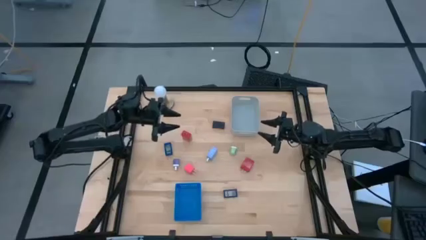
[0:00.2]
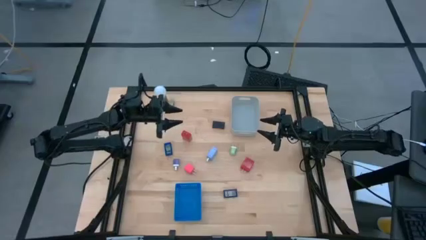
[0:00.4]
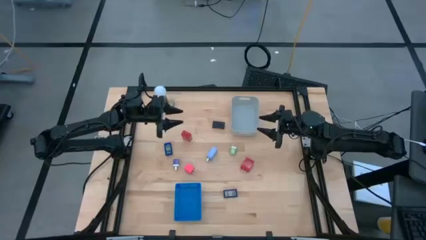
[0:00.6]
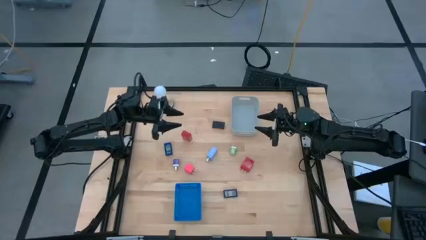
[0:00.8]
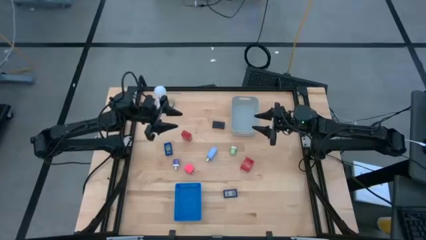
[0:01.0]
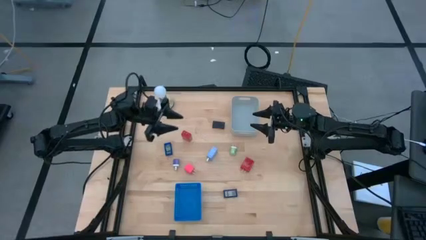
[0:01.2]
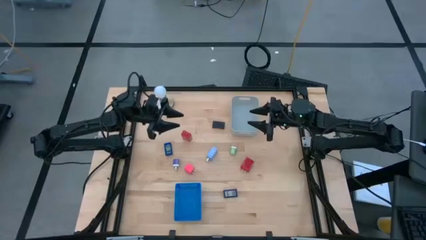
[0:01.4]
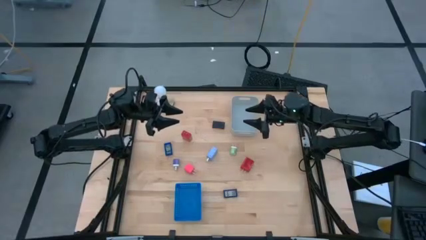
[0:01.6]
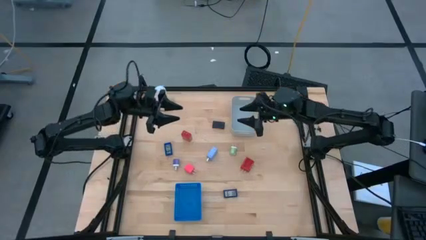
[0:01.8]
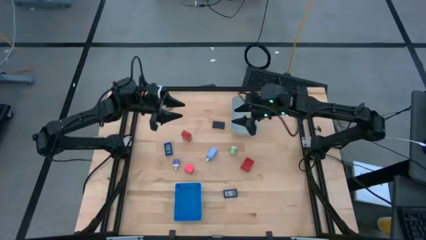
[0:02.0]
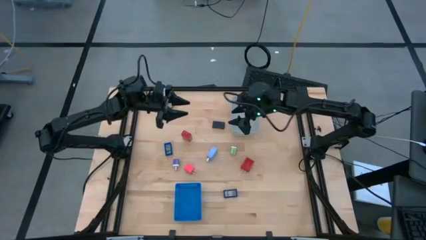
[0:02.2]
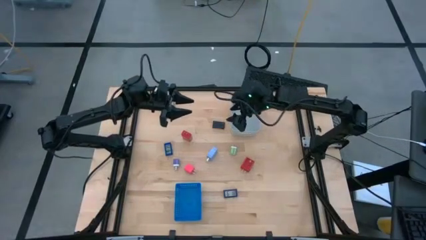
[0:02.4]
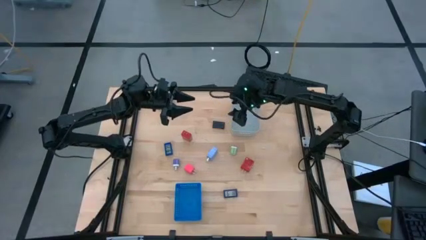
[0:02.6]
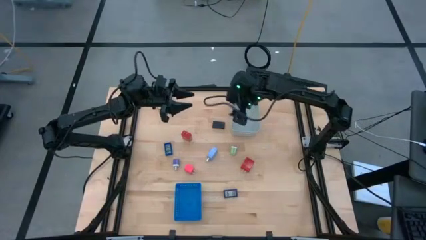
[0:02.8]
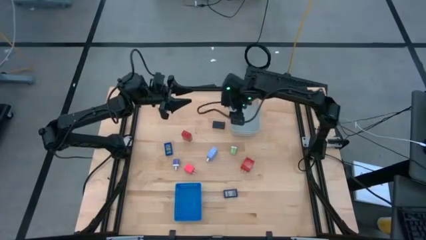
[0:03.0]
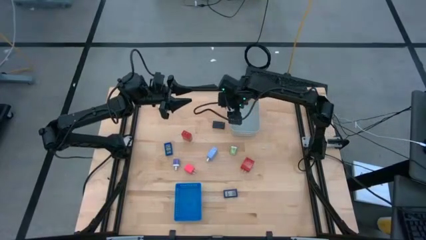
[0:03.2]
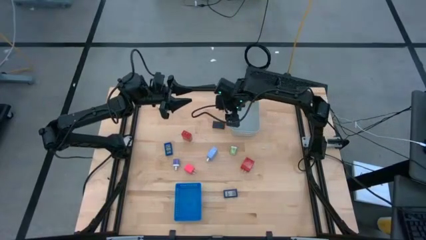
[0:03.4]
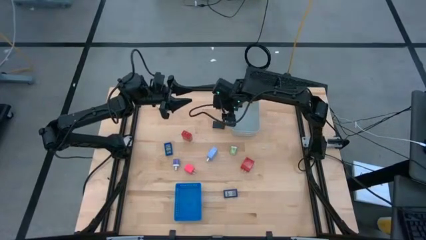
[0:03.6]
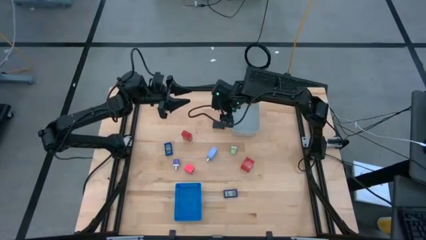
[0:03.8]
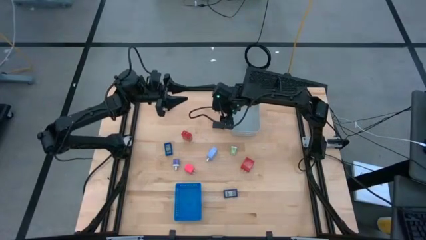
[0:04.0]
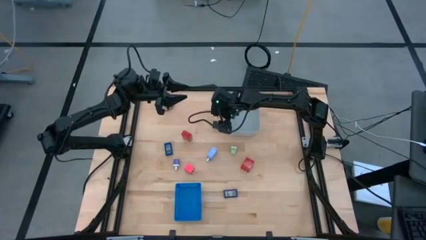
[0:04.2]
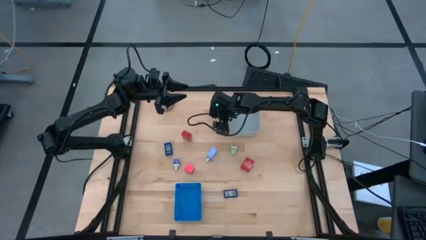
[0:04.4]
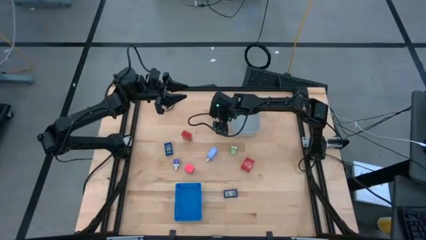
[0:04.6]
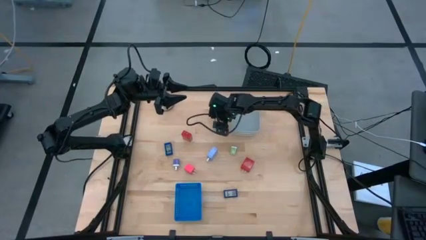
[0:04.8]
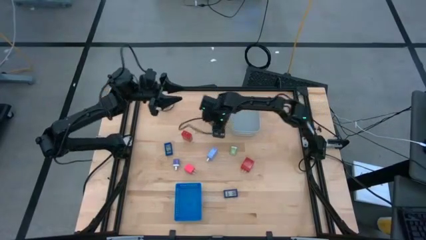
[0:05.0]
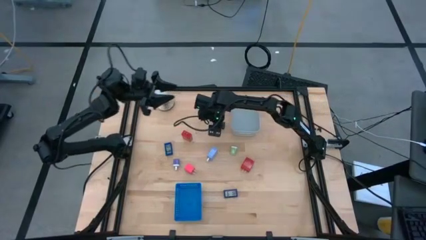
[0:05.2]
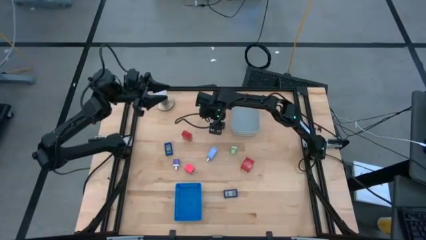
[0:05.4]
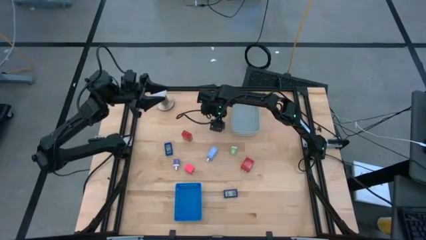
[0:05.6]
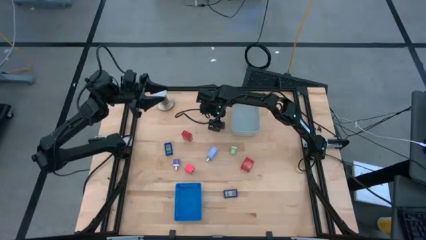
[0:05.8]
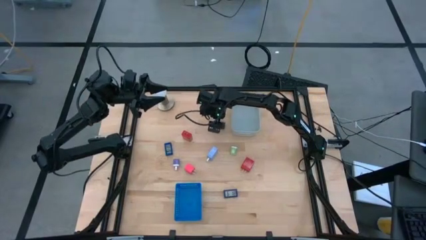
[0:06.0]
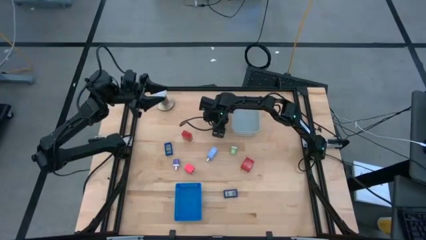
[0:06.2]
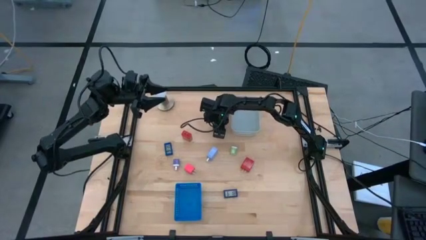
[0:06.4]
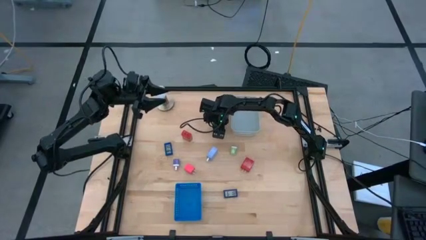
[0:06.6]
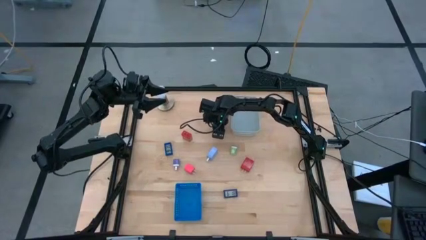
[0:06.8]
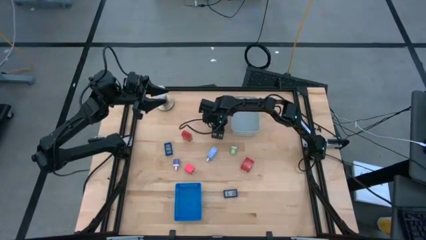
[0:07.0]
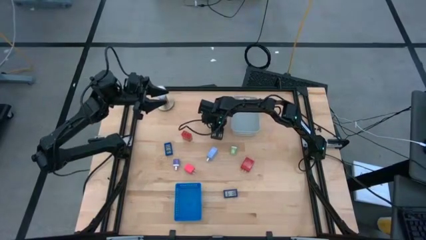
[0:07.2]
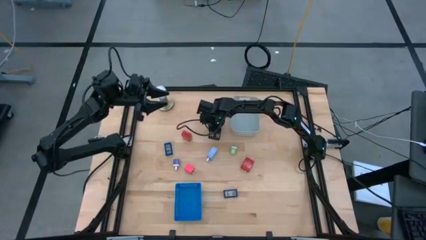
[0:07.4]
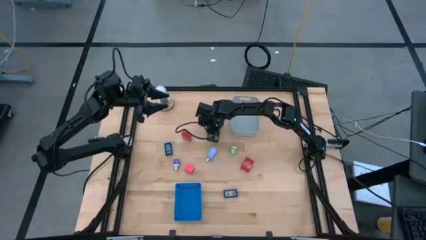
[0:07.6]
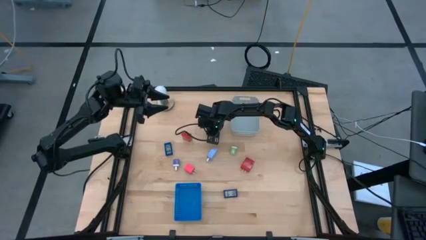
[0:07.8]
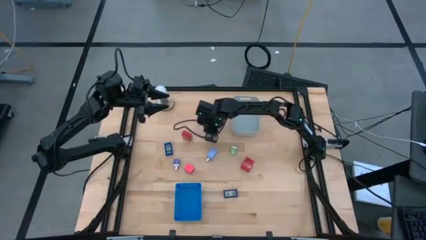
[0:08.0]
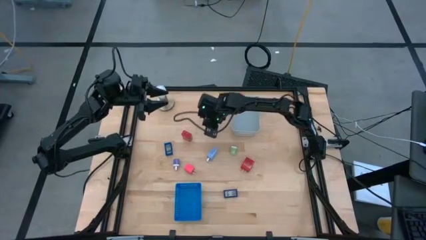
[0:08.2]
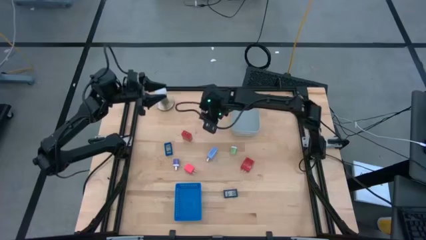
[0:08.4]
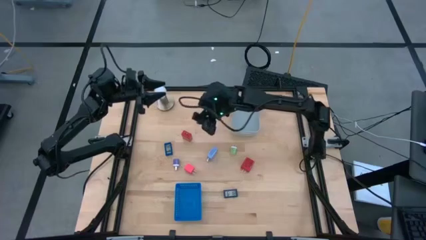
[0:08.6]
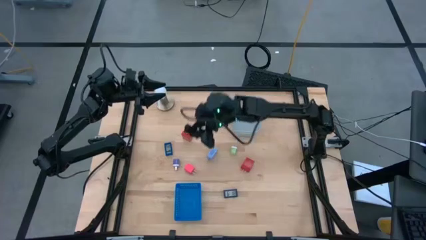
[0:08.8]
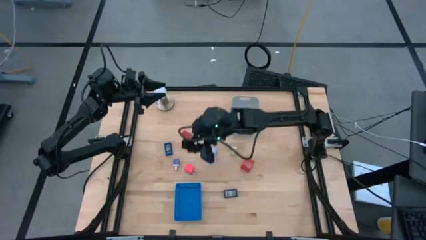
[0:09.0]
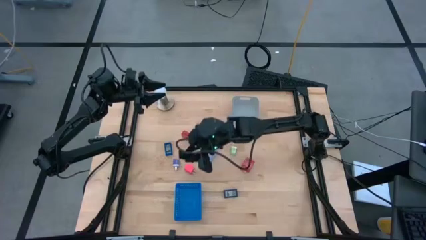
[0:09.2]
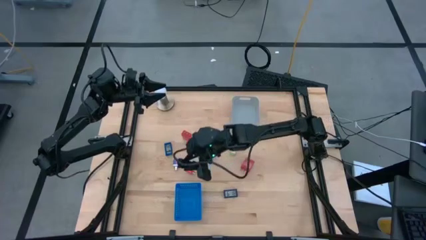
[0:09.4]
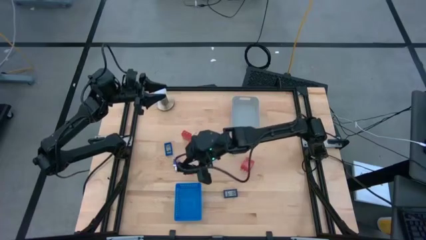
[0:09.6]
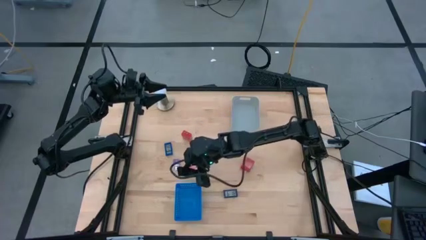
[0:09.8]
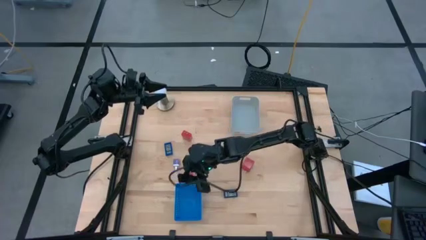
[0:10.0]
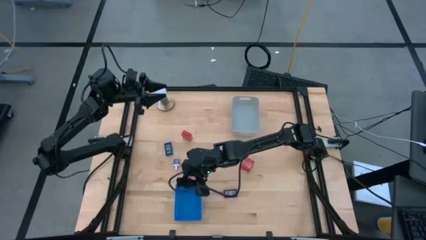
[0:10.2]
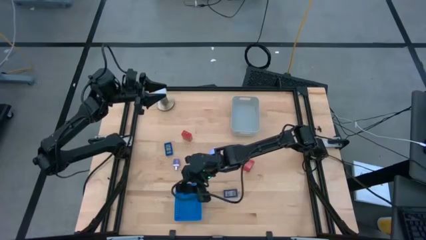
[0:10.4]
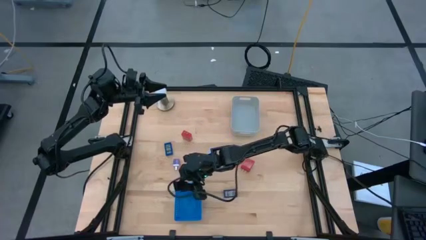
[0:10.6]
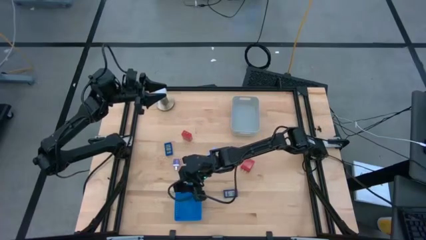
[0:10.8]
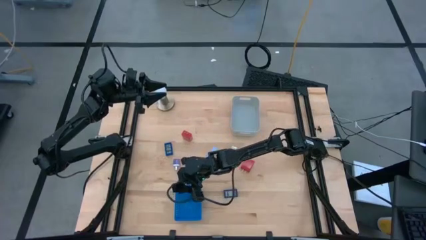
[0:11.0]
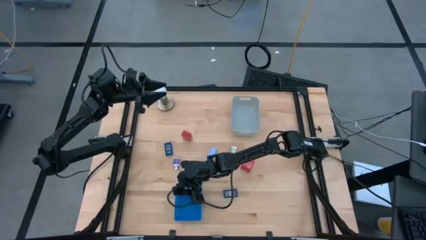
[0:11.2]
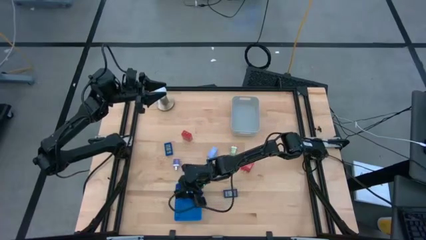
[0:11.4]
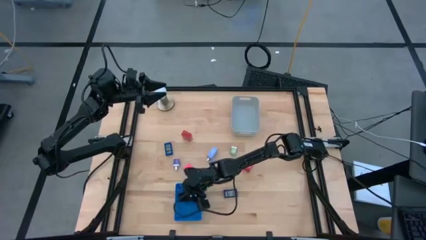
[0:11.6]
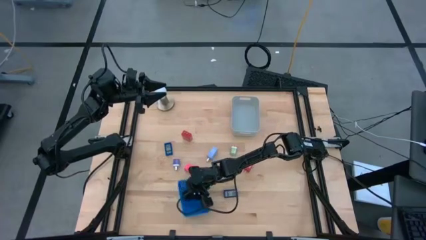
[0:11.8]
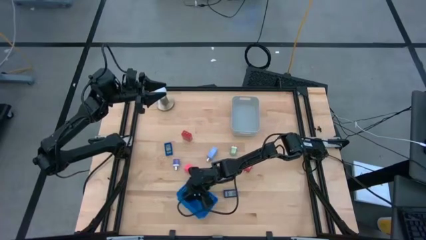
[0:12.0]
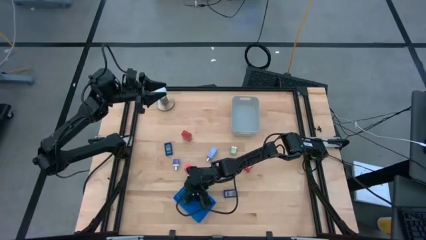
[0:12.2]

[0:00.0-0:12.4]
Task: Pick & Place Office items
Put the black digital timer into the blue bin
